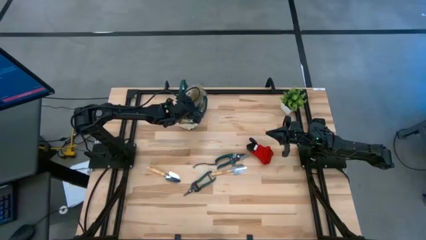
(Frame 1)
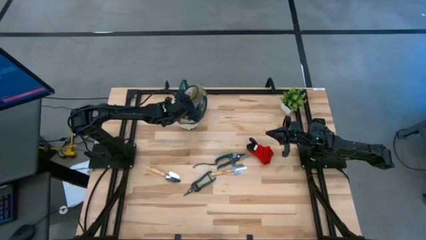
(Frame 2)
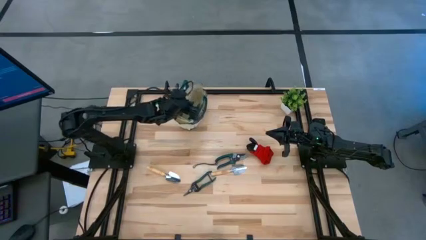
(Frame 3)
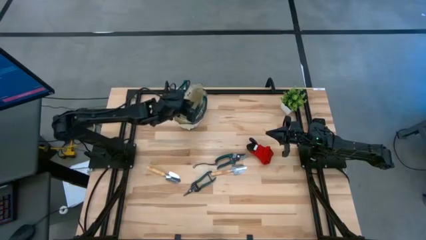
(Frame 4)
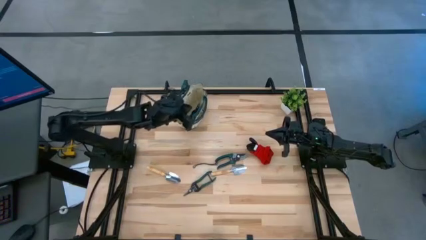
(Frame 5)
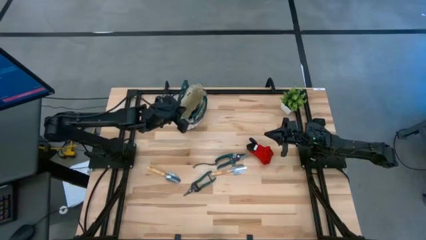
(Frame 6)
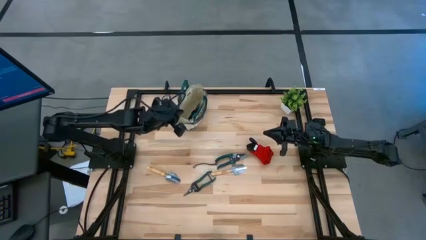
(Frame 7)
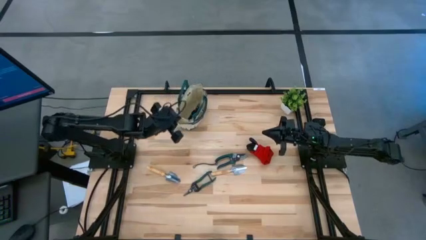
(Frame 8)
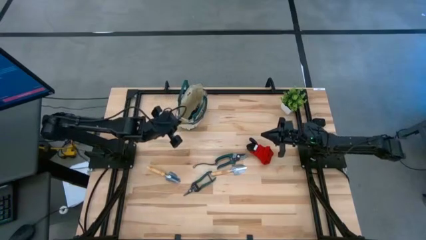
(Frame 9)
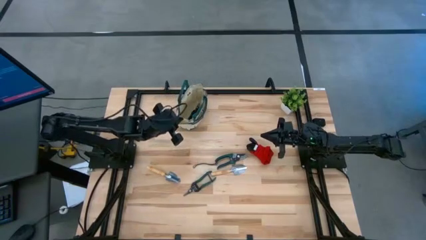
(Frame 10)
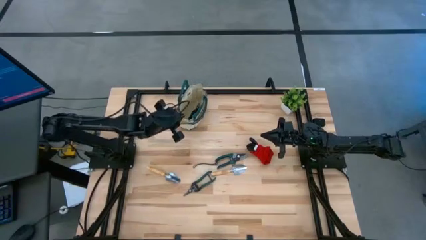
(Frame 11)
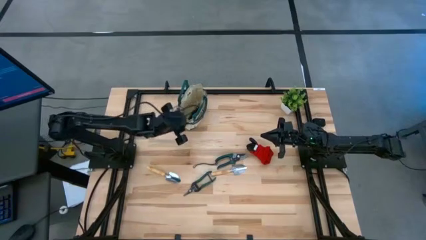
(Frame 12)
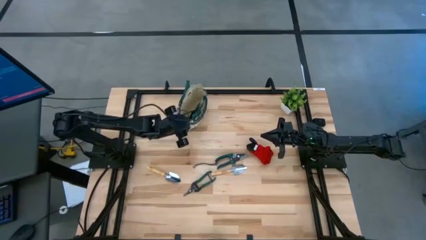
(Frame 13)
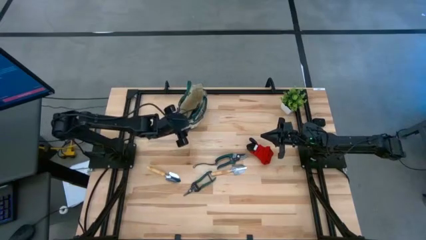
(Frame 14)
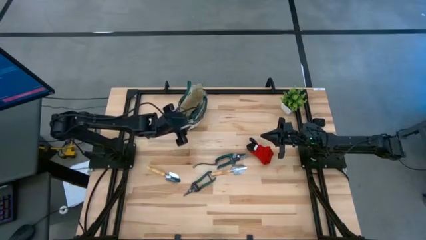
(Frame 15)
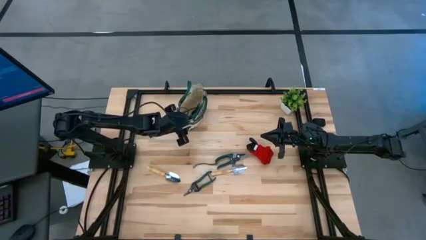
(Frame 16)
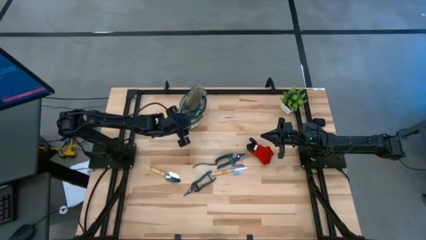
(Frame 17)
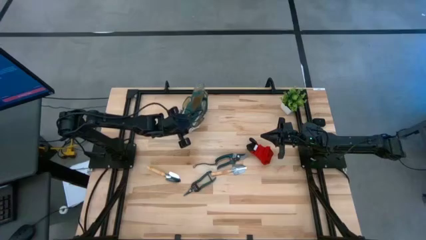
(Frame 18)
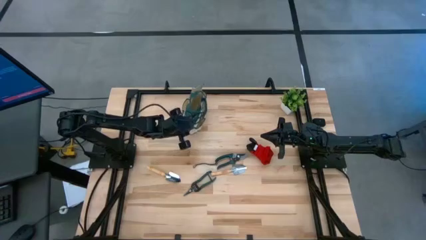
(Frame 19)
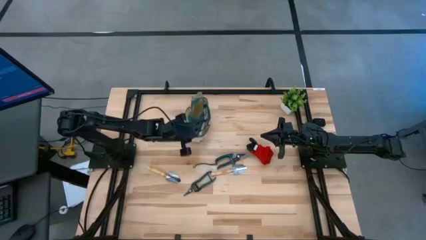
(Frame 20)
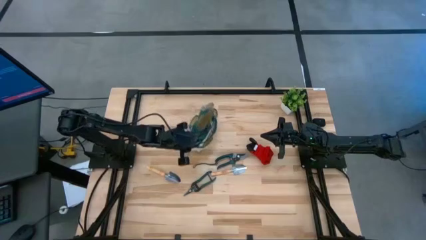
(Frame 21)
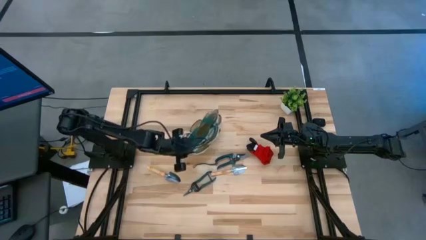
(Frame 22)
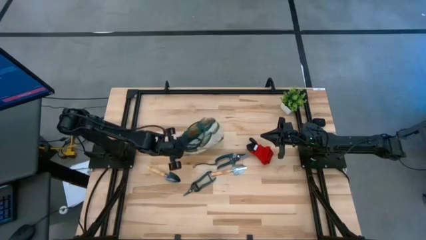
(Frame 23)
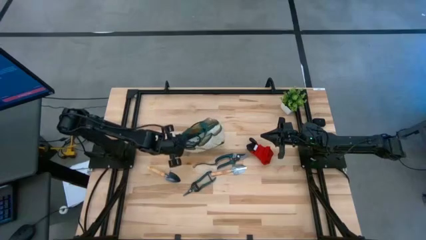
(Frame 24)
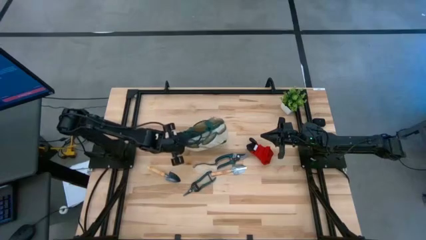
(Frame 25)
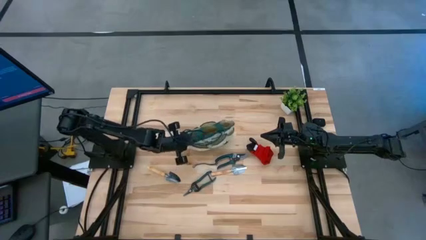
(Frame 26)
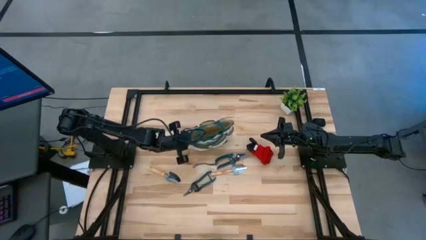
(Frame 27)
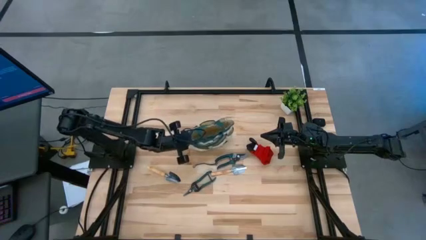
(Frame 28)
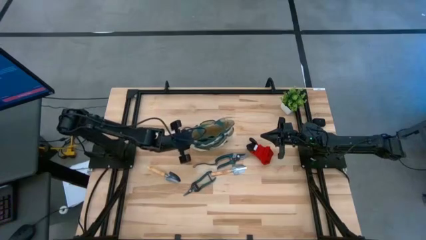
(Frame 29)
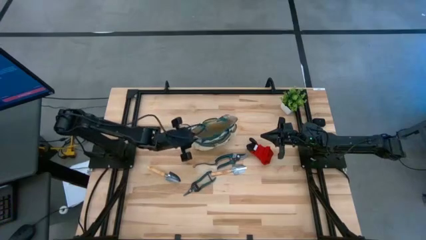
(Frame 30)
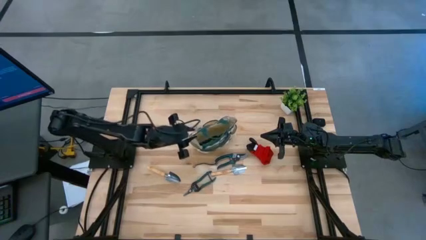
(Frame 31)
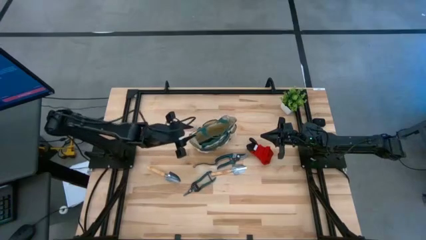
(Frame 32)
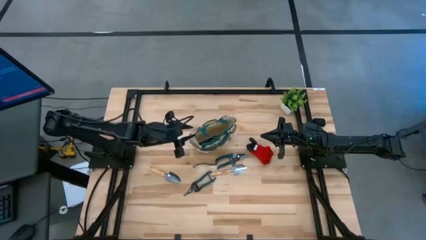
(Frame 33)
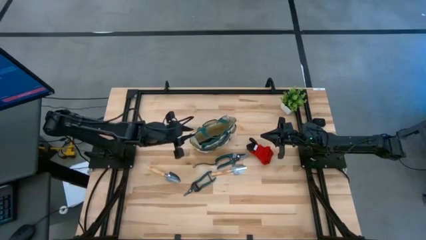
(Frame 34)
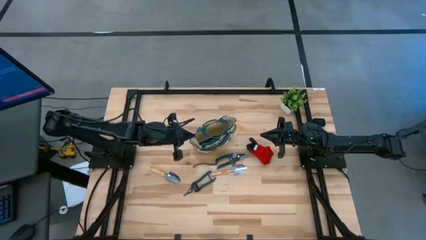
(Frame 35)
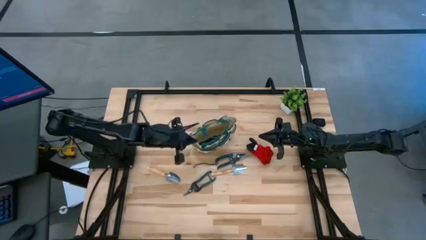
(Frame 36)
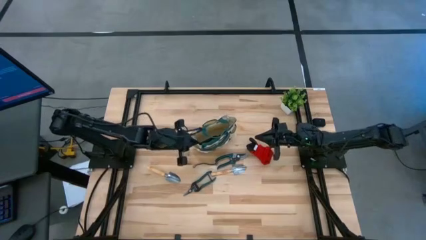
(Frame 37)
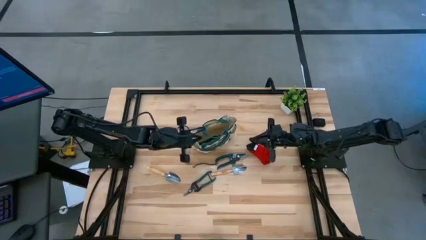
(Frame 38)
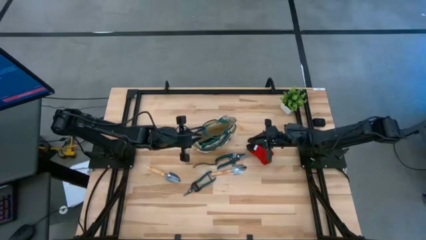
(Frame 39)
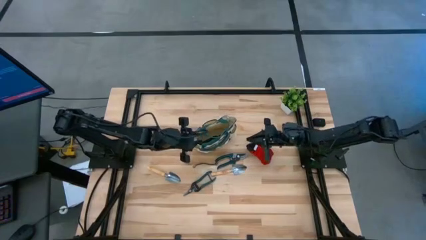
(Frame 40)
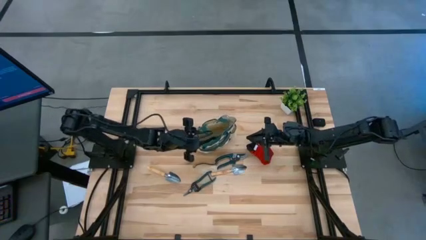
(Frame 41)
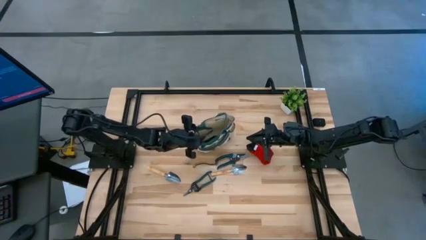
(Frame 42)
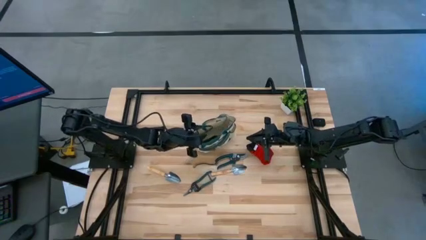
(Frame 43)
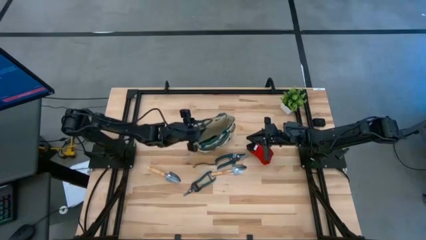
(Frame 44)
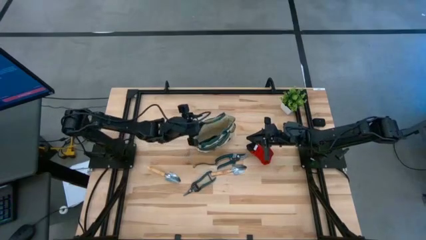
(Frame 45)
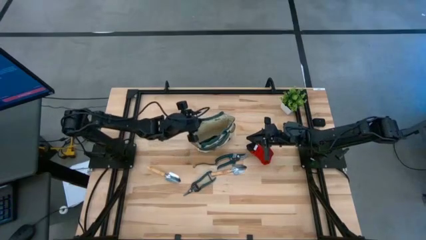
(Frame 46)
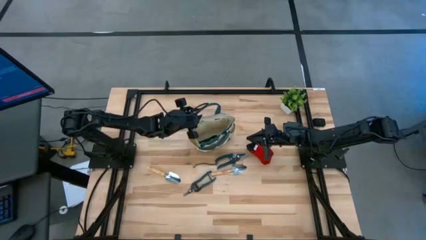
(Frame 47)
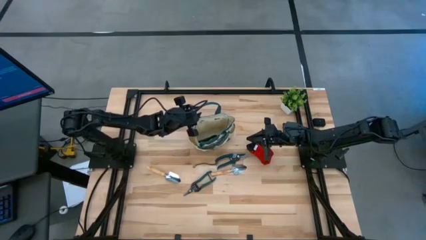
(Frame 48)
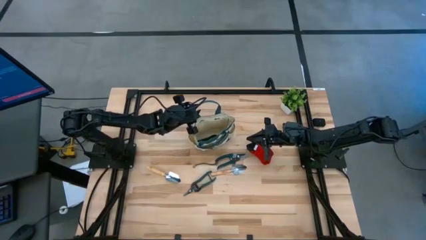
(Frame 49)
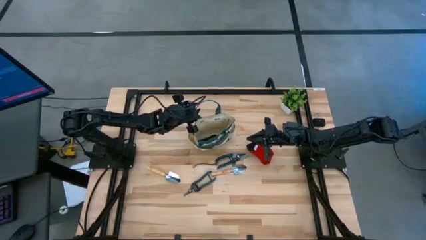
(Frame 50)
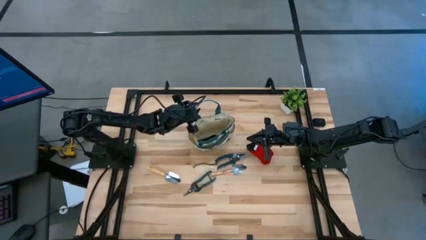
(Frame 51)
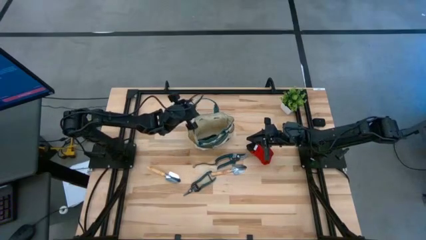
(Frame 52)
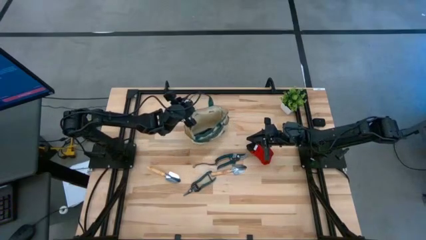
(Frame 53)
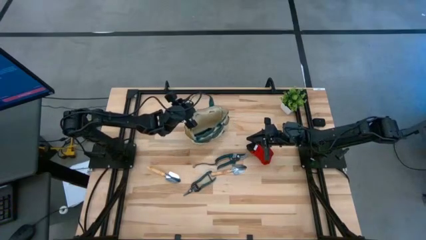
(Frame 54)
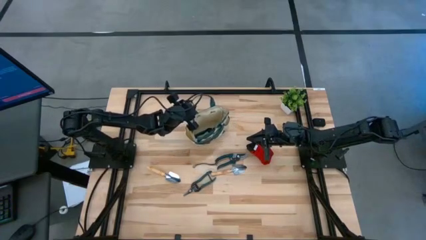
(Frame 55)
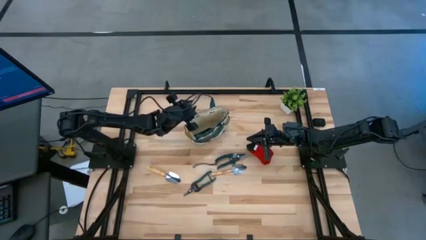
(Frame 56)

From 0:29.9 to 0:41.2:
Task: Pick & Place Garden tools in Gardening bag
Adjust the brown gardening bag

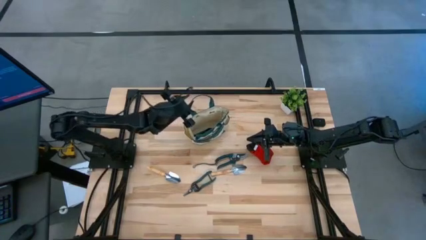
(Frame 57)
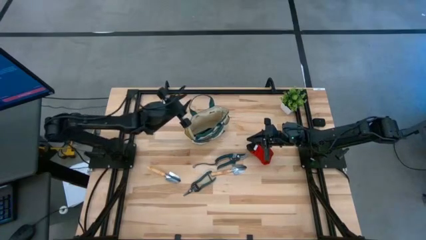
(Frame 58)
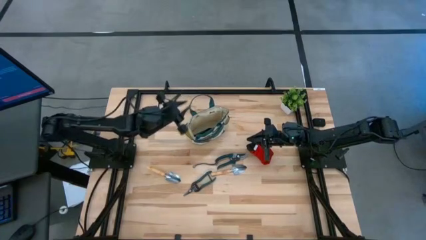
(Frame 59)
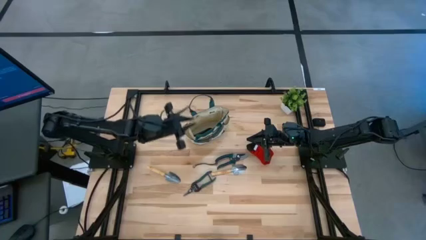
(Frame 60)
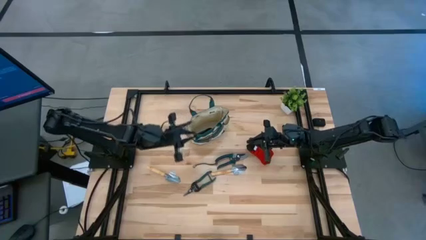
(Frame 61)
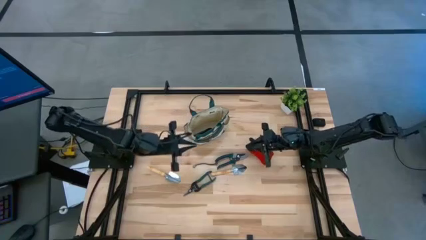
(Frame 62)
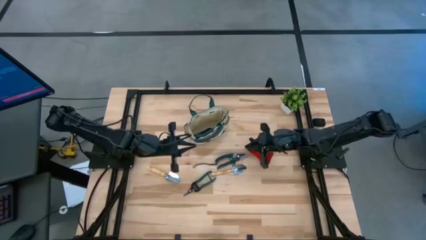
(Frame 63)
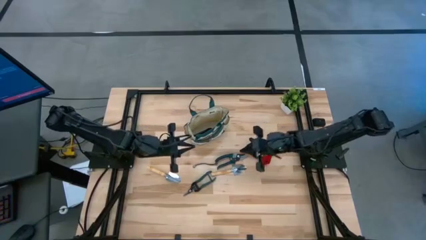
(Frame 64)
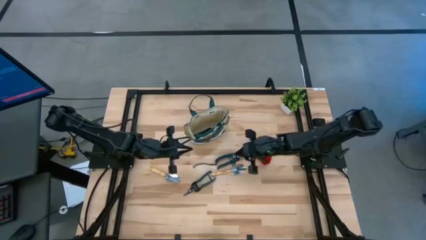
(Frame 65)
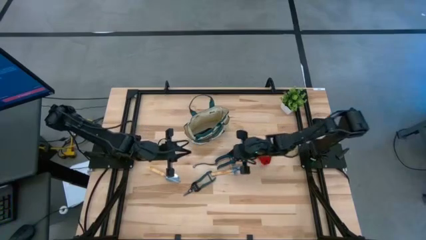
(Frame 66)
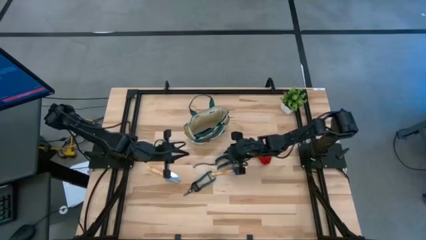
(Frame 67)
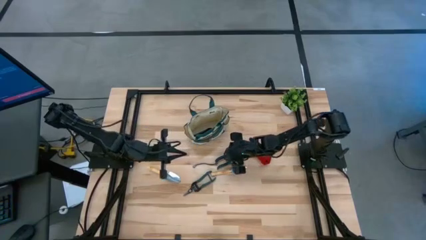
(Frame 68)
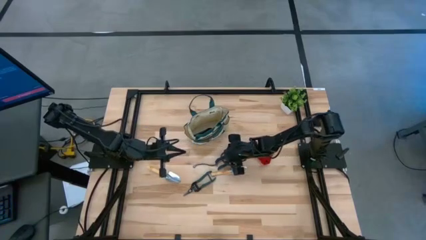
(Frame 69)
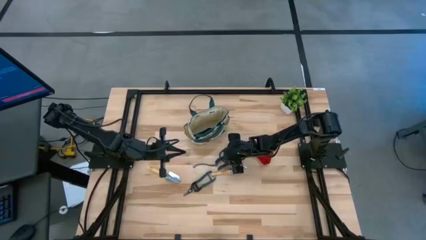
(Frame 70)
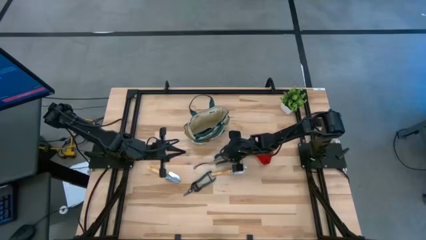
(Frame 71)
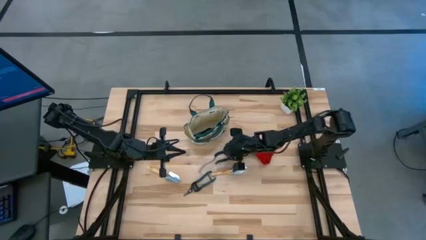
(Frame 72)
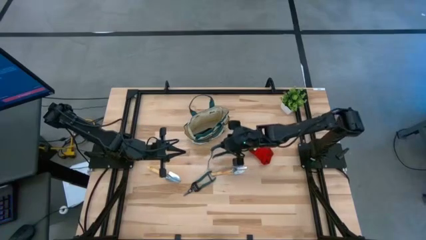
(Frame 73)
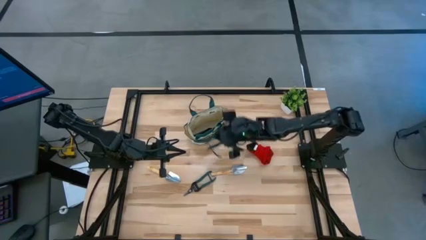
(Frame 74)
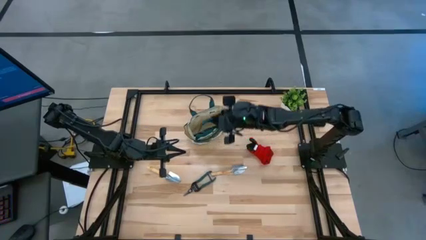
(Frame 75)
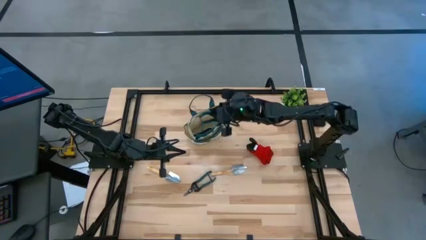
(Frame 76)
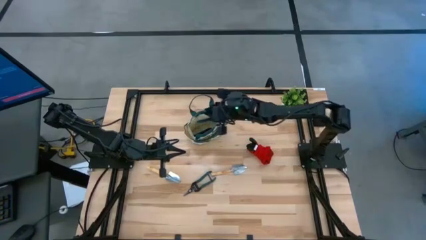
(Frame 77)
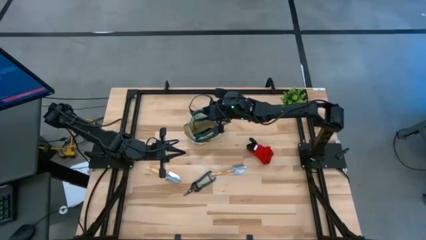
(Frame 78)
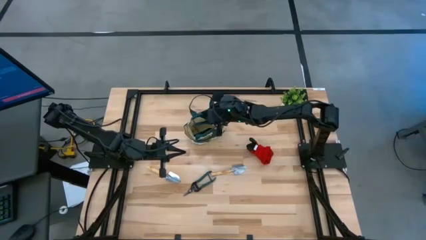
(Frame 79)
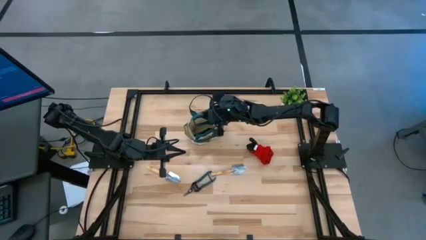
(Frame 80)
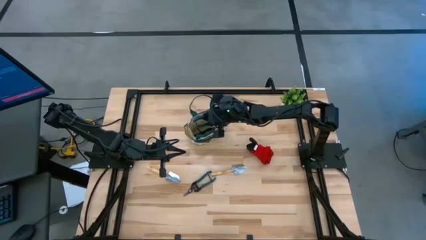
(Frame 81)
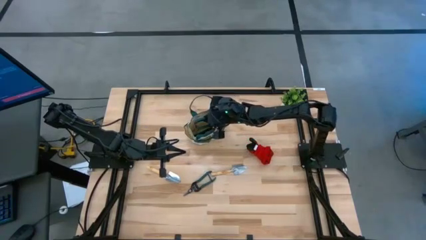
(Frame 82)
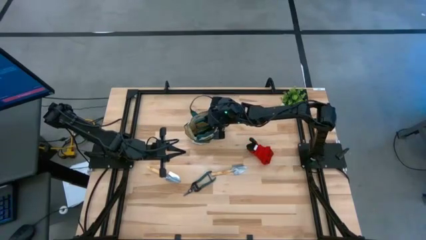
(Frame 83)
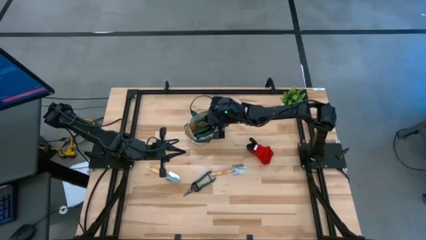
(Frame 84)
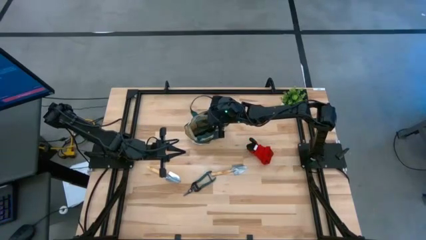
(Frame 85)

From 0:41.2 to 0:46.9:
Put the top green shear scissors into the brown gardening bag

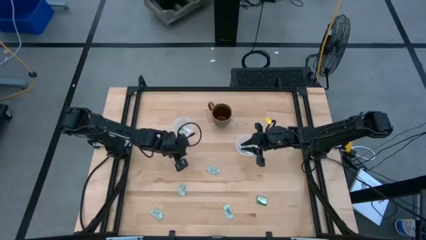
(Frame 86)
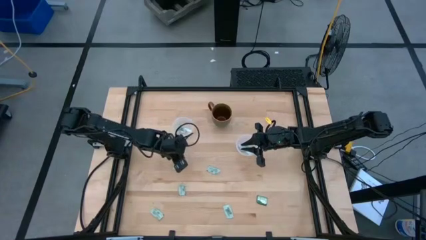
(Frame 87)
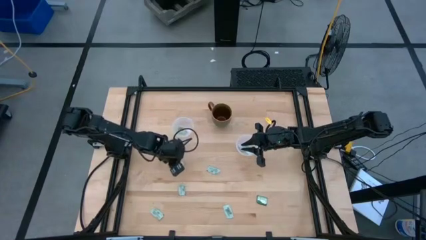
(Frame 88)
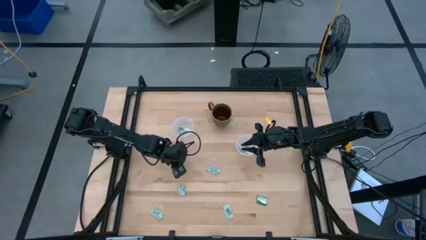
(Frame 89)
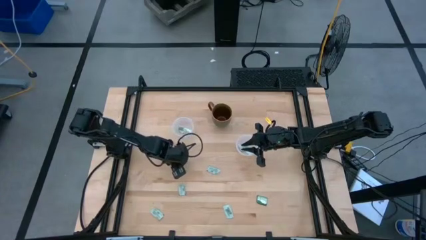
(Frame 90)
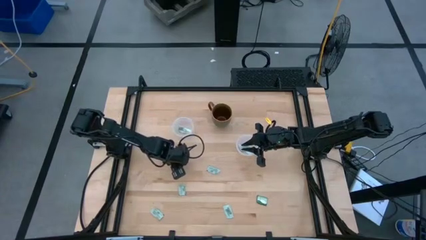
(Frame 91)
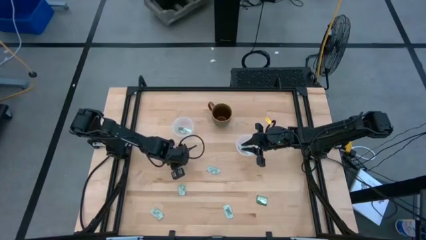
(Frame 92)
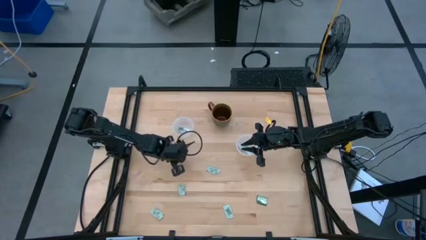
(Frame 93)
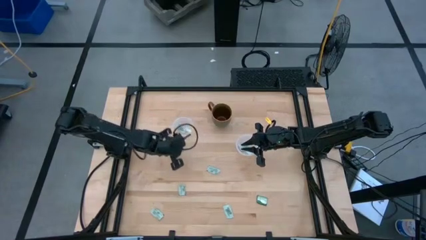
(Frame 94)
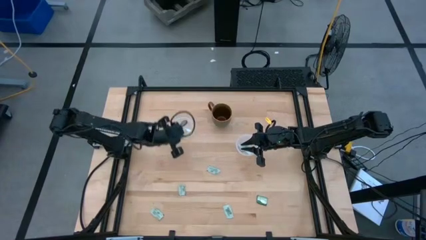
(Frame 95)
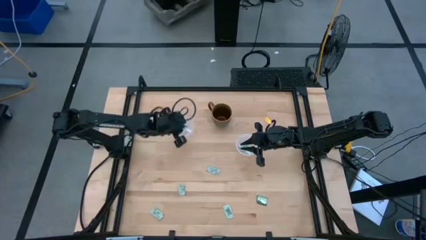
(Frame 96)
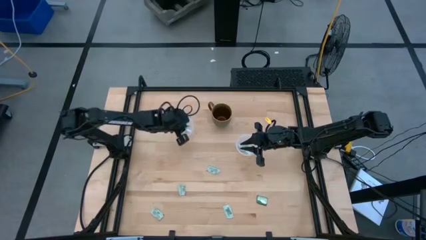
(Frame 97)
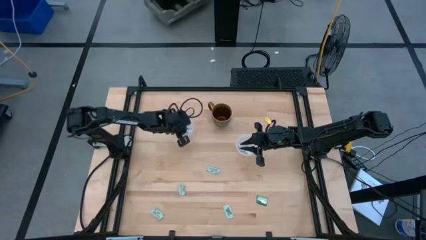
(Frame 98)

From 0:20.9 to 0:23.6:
Task: Pick and place Stevia / Truvia into bins
Put the white stevia packet into the left round transparent container
